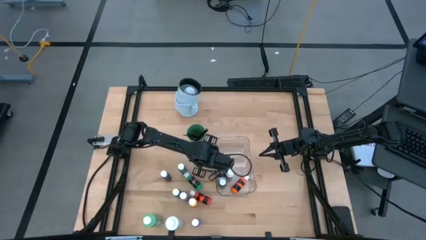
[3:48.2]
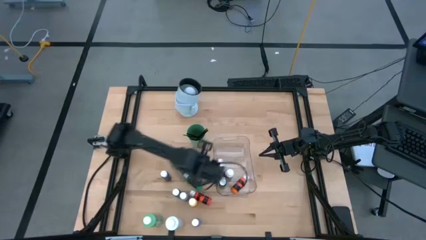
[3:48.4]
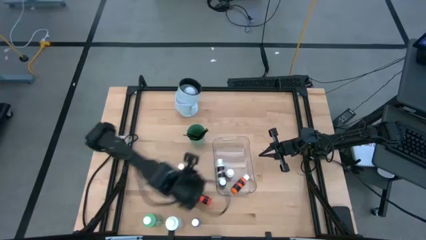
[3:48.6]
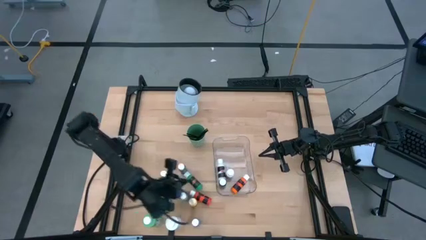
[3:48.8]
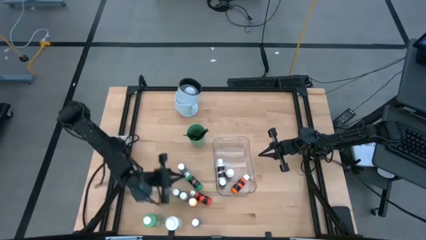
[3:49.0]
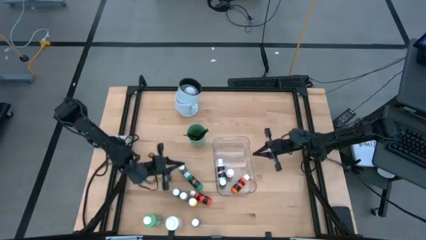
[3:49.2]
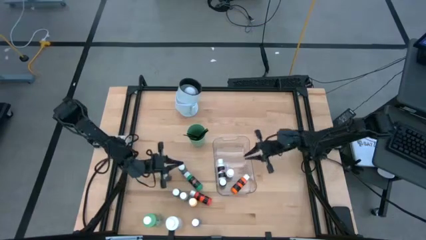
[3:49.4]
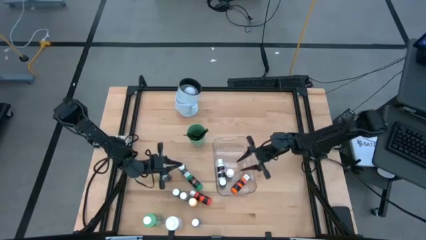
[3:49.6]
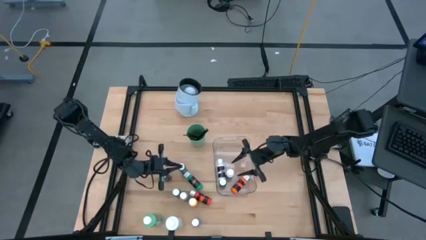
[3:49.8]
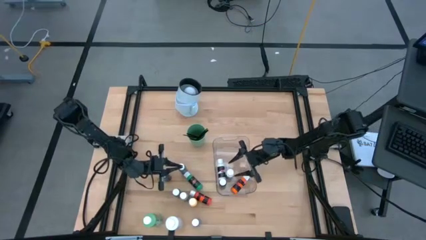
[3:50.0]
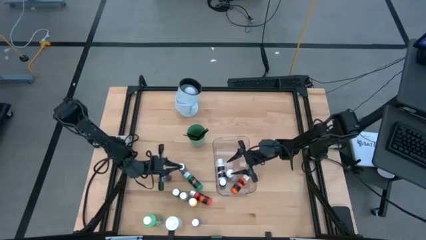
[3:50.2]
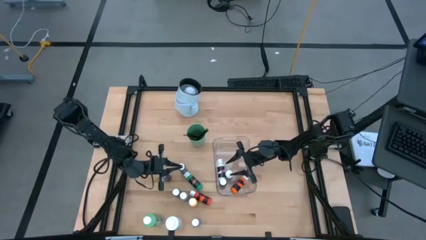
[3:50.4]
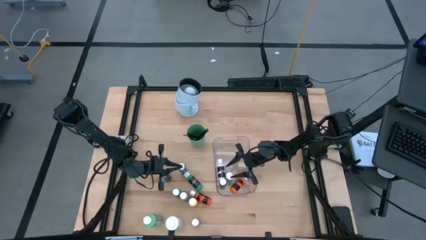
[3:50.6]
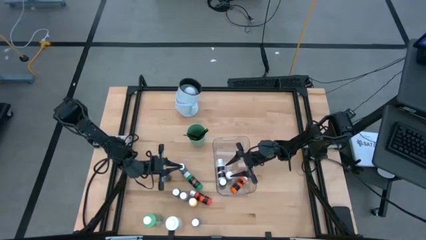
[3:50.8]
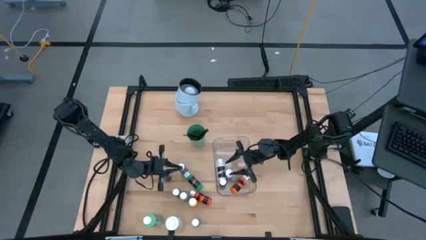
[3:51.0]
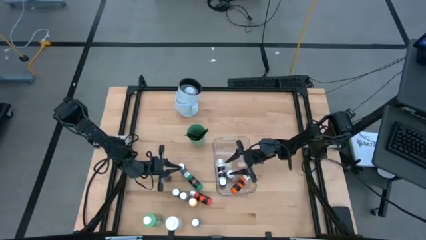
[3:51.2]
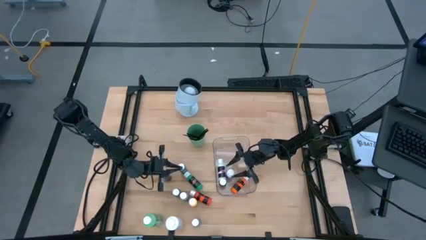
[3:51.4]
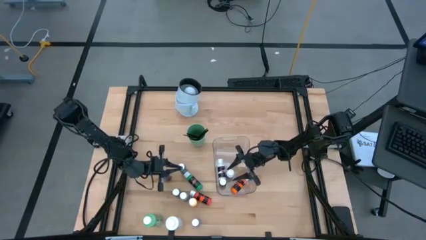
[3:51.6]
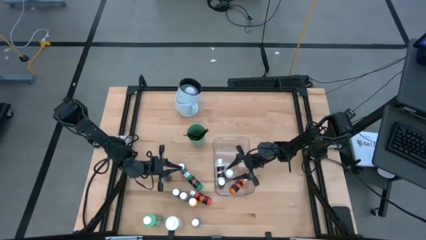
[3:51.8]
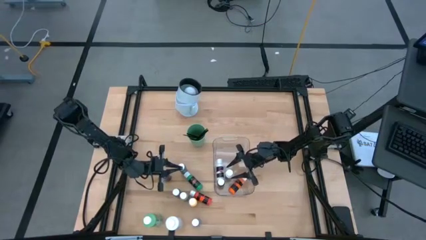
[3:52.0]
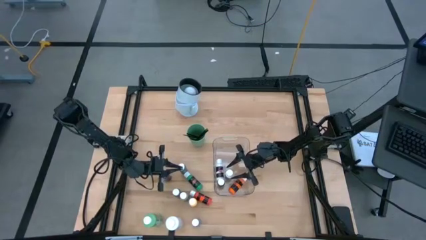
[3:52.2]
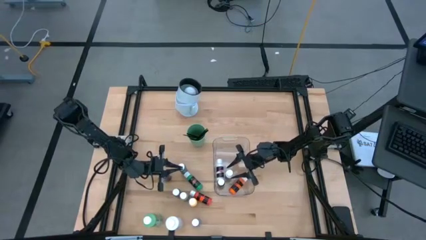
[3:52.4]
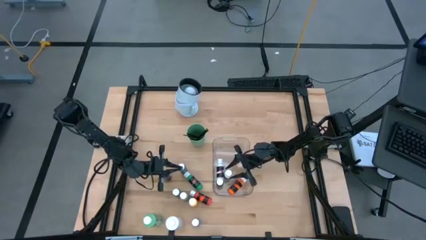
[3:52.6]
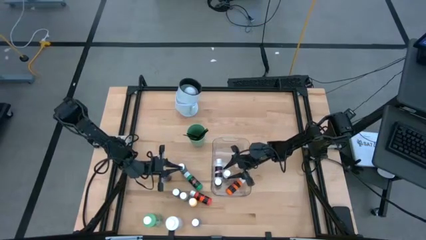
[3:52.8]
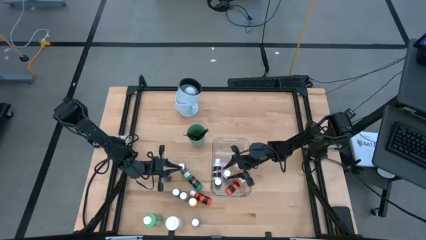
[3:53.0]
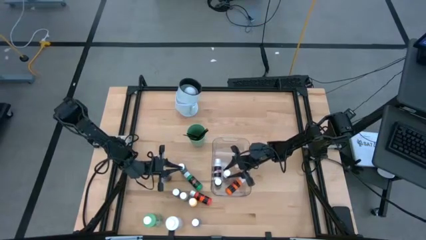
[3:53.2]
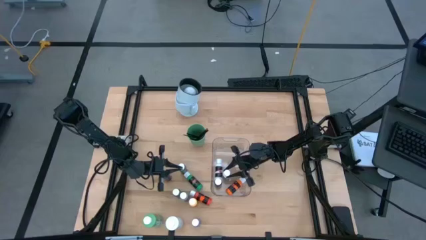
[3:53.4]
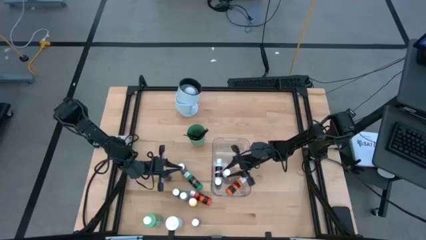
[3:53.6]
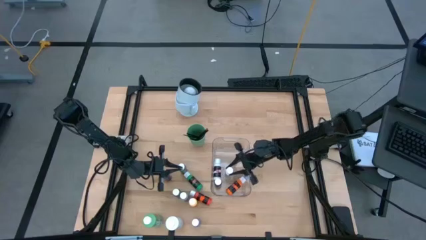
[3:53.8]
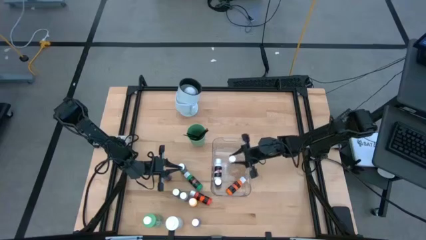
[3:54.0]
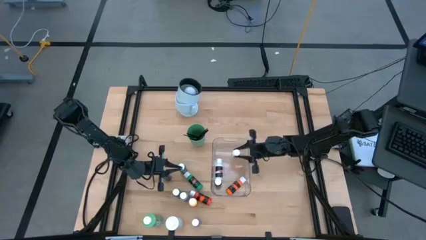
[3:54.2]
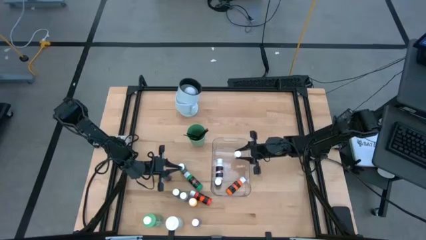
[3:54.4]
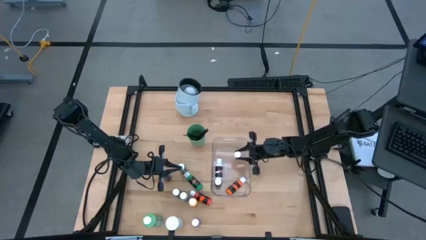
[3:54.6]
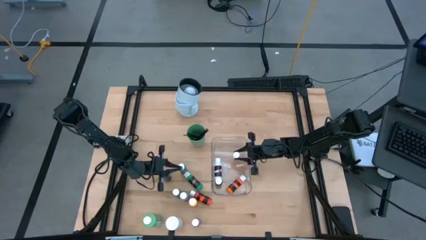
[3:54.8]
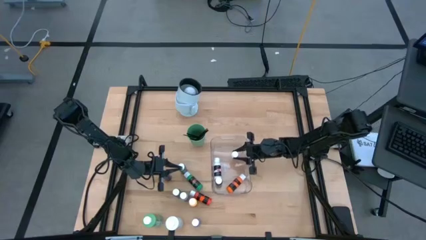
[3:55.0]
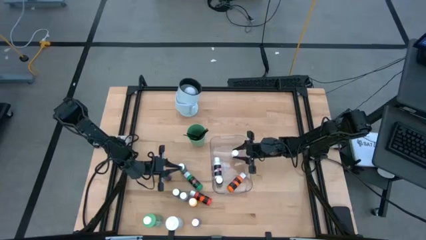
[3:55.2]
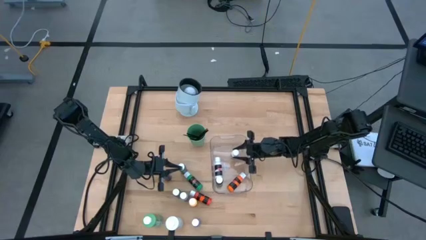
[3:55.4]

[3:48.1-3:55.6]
Task: Pick & Place Paint Supplies
Adjust the small white paint bottle in the transparent bin

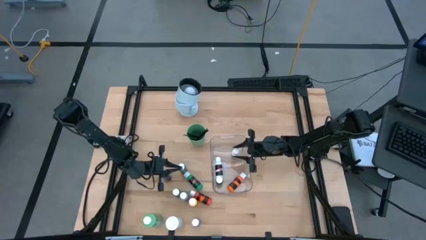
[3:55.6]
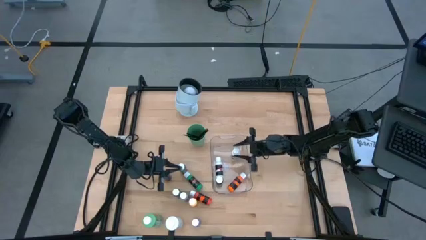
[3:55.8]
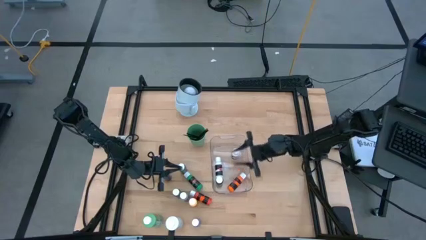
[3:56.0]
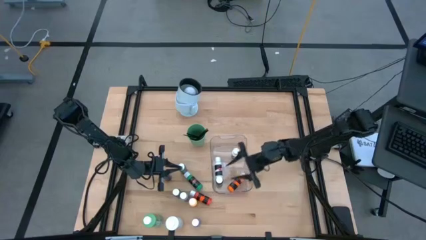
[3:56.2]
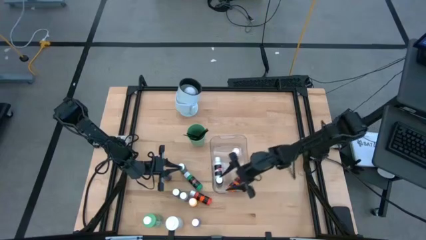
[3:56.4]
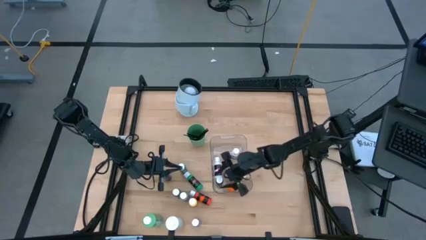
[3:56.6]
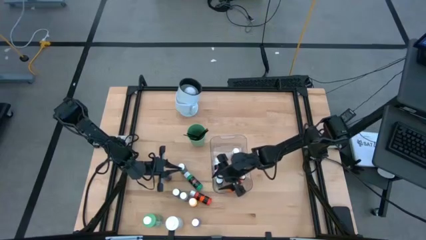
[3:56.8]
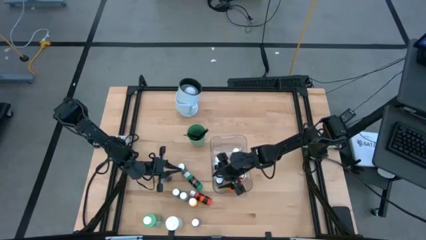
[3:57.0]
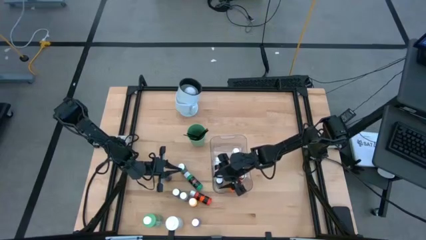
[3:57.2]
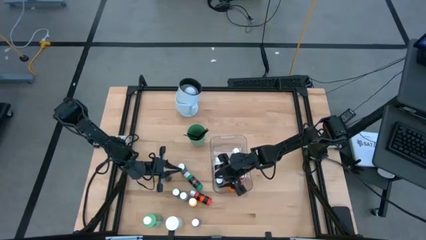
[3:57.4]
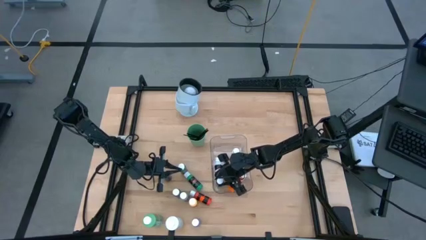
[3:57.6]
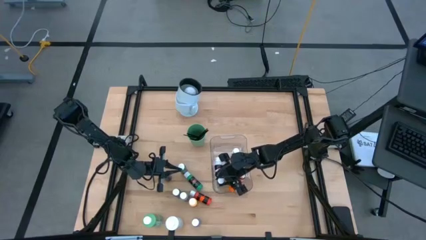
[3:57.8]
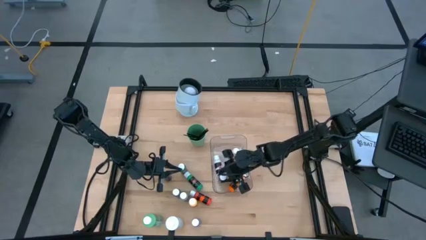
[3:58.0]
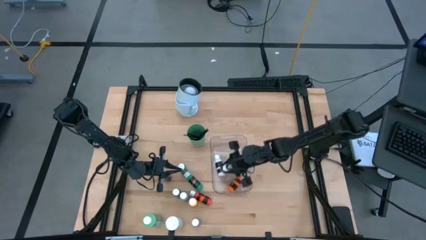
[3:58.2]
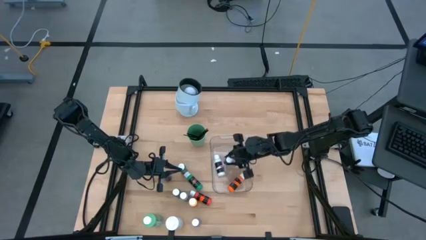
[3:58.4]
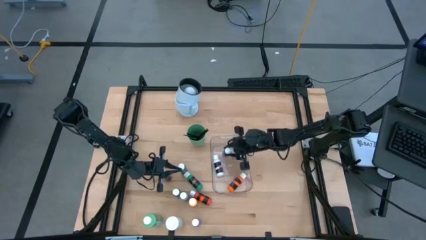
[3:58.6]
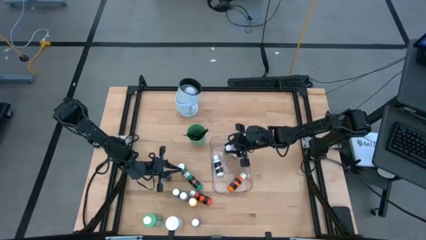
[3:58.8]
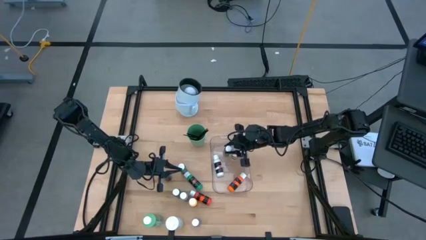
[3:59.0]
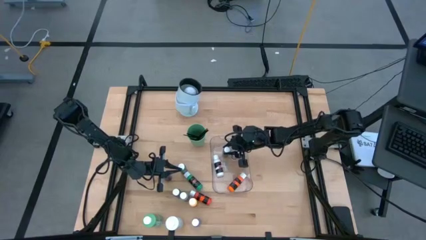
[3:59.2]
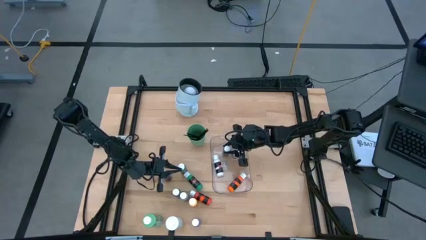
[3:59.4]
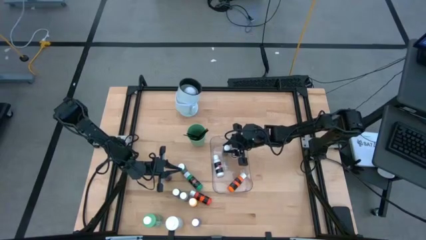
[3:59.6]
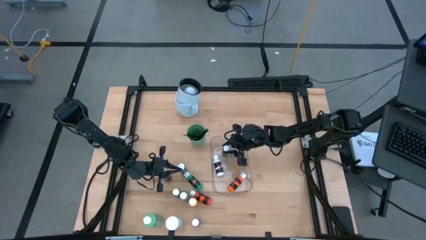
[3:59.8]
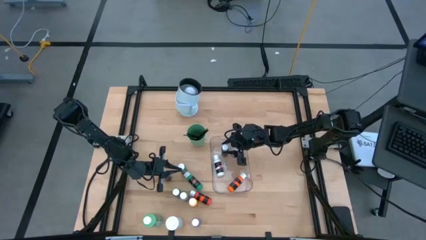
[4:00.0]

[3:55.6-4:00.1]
Adjust the small black paint bottle in the transparent bin

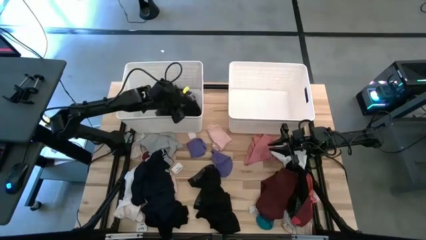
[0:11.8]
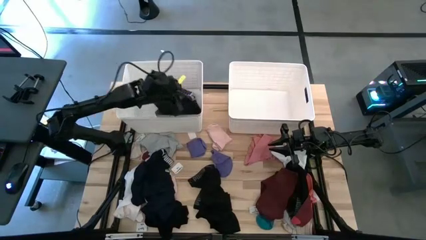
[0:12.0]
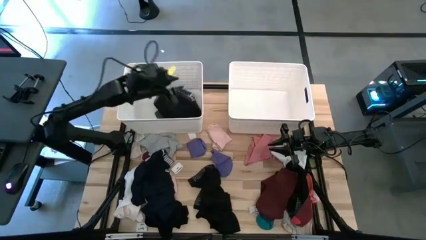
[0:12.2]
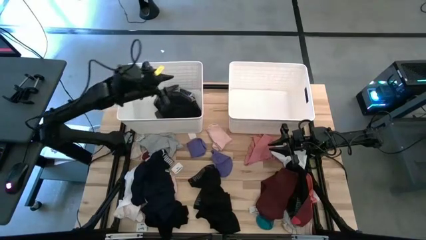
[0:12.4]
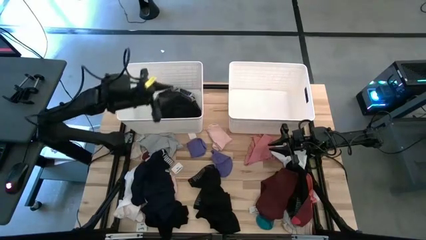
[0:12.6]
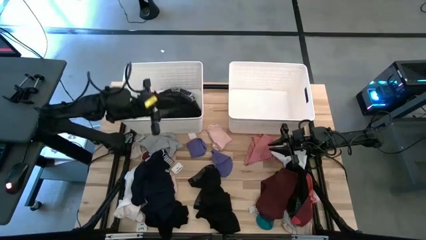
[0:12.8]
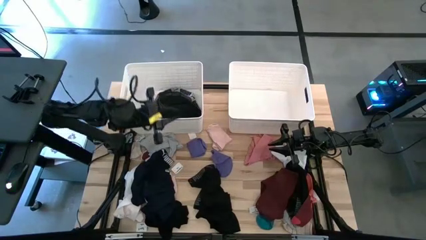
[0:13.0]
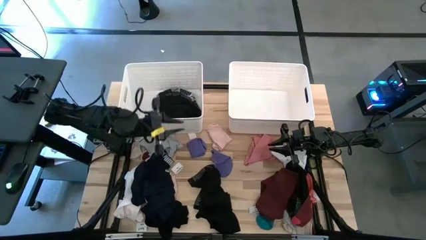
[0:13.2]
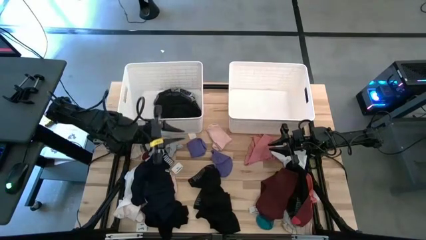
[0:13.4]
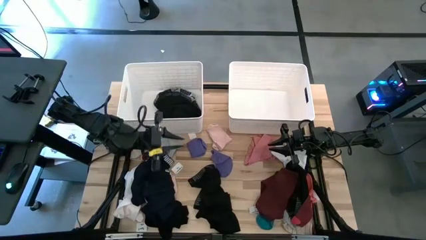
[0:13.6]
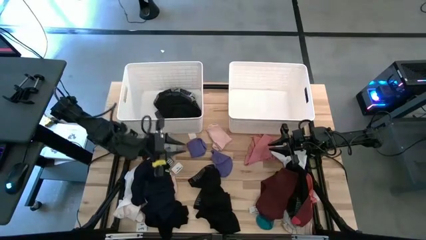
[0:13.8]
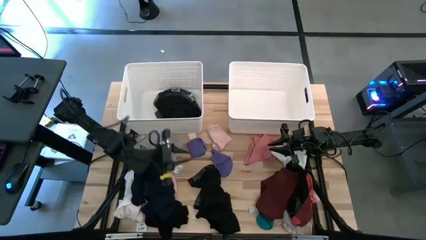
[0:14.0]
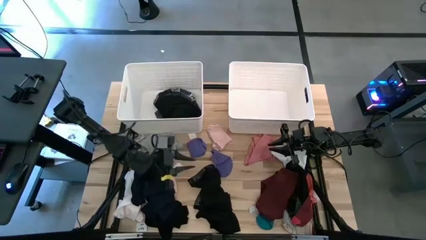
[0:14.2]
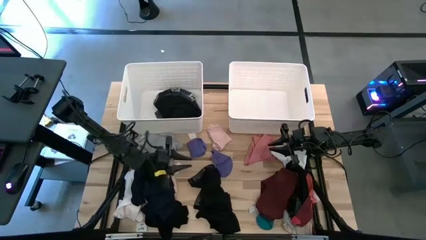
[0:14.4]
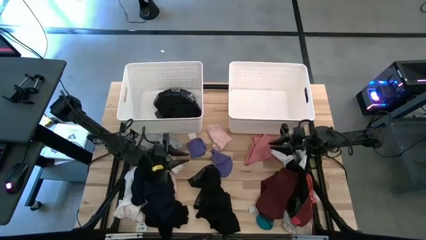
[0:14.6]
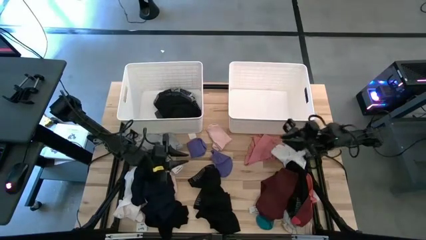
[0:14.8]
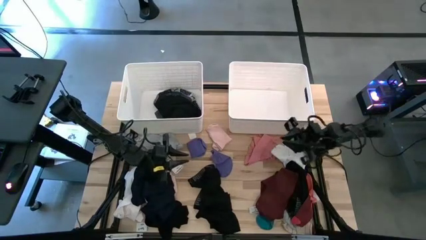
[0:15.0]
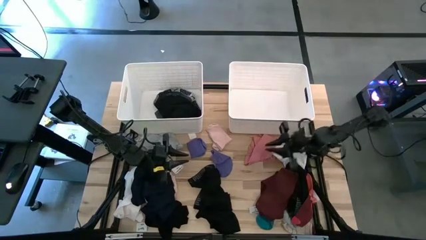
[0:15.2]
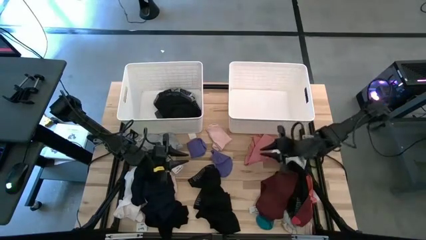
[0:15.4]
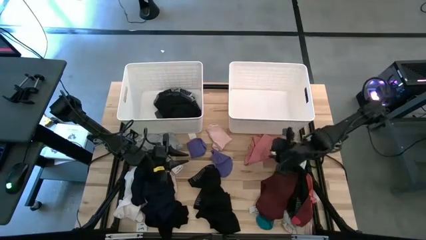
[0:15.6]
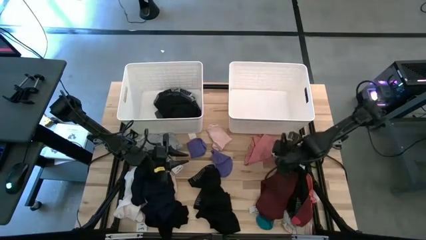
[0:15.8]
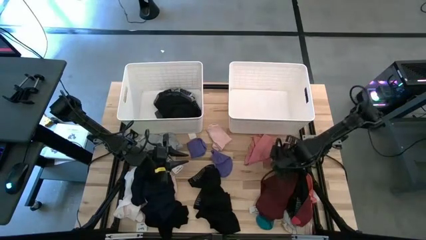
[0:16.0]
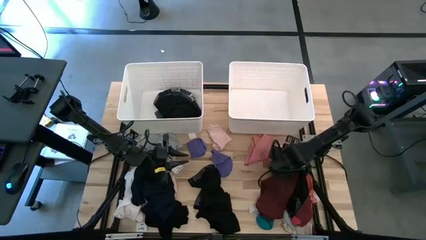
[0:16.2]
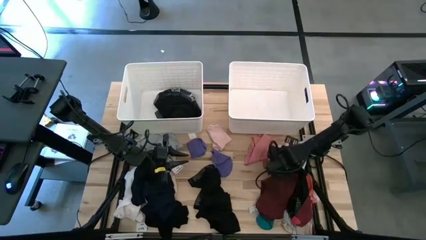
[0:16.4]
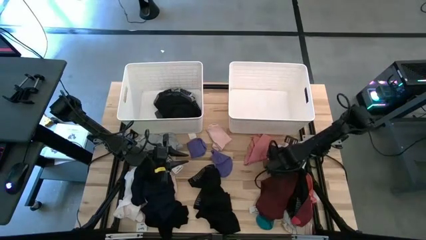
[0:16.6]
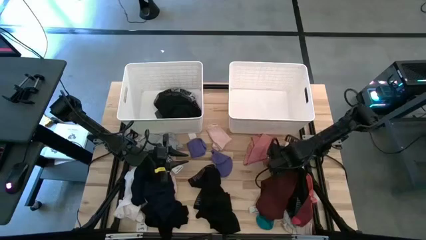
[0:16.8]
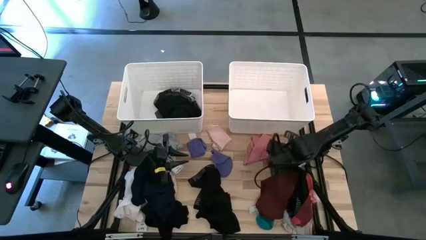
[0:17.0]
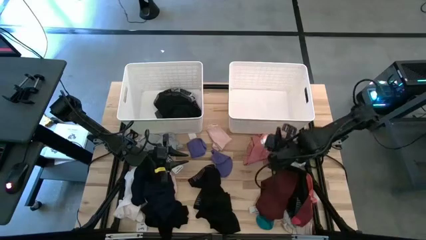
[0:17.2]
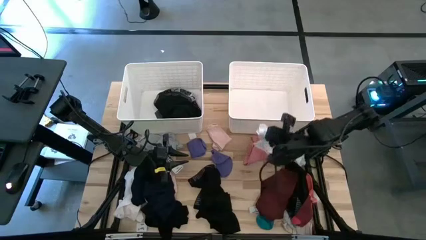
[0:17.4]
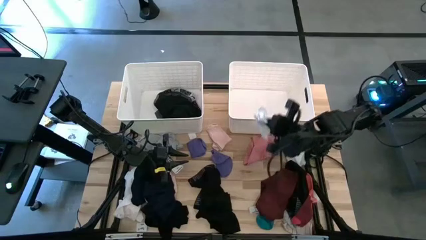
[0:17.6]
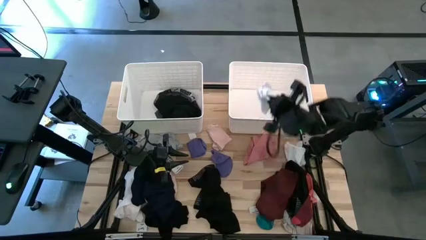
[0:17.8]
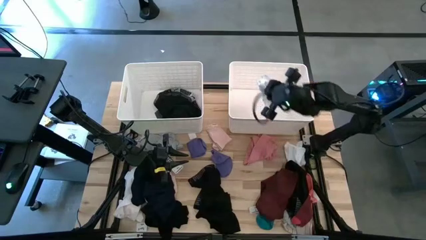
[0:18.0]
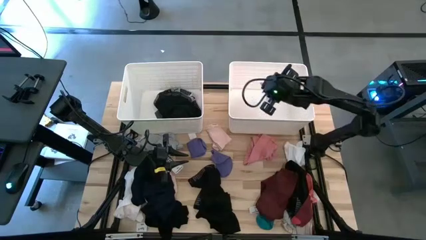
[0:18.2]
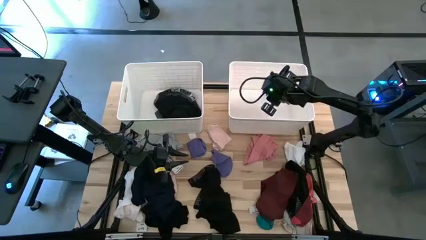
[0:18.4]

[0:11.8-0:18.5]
Task: Sort clothes
Put the white sock into the right white laundry bin
